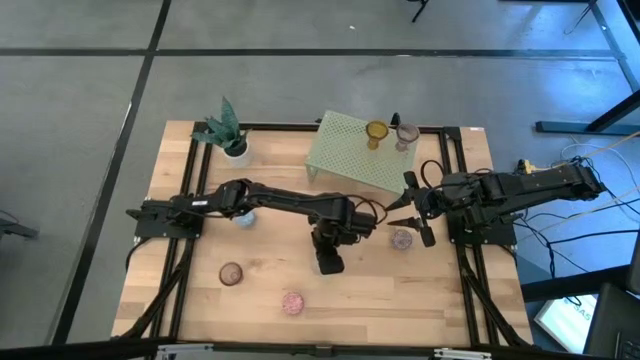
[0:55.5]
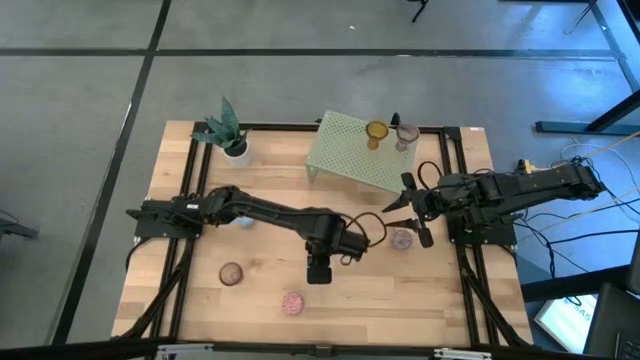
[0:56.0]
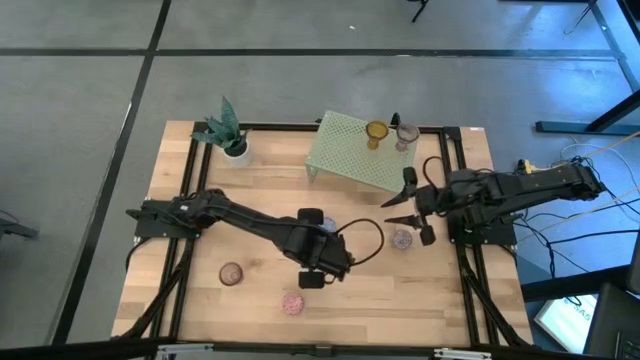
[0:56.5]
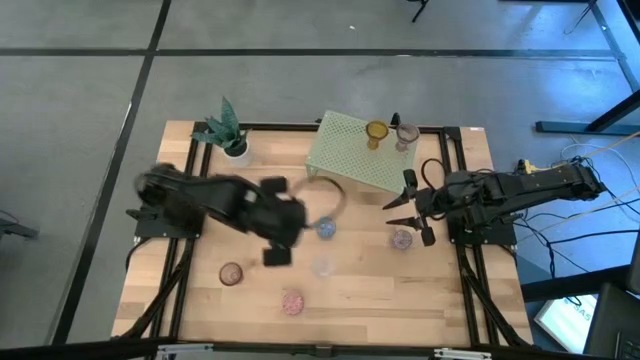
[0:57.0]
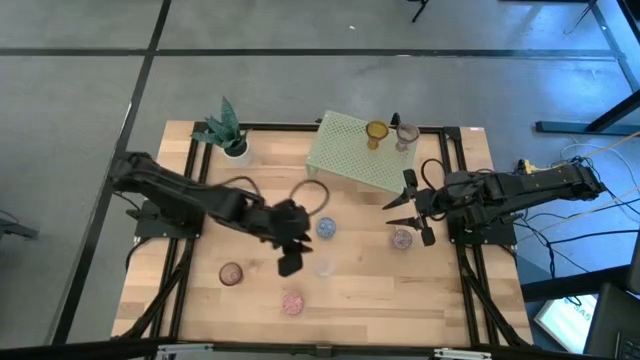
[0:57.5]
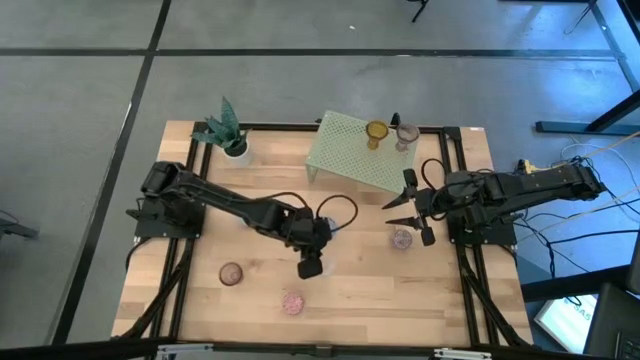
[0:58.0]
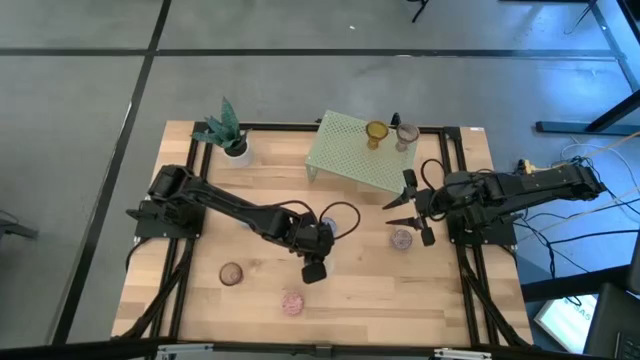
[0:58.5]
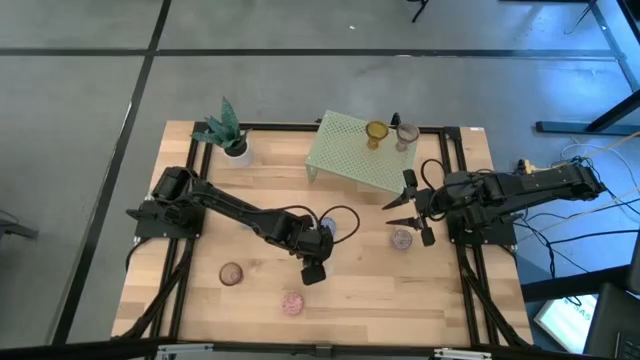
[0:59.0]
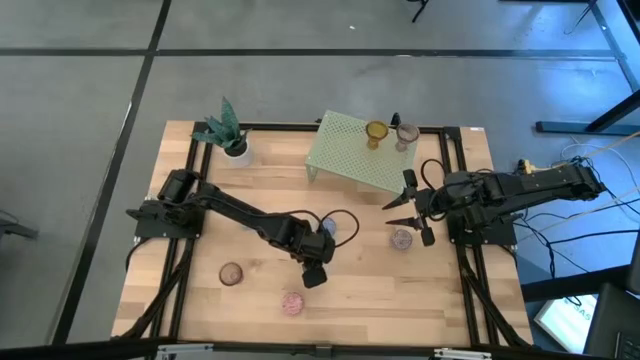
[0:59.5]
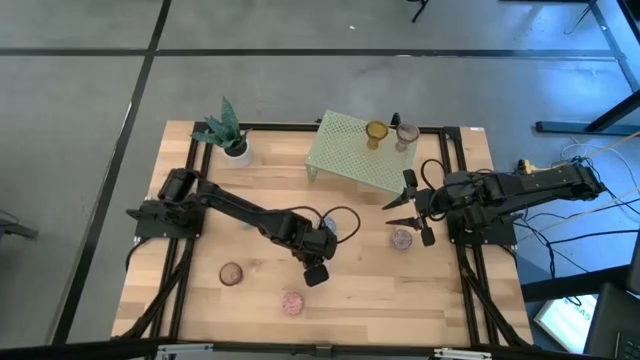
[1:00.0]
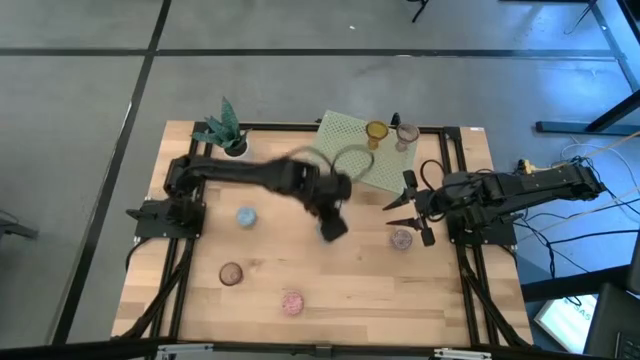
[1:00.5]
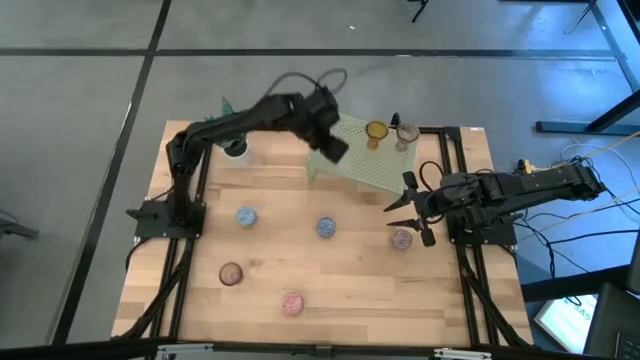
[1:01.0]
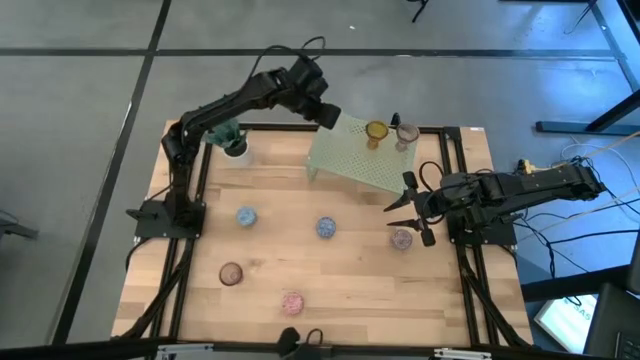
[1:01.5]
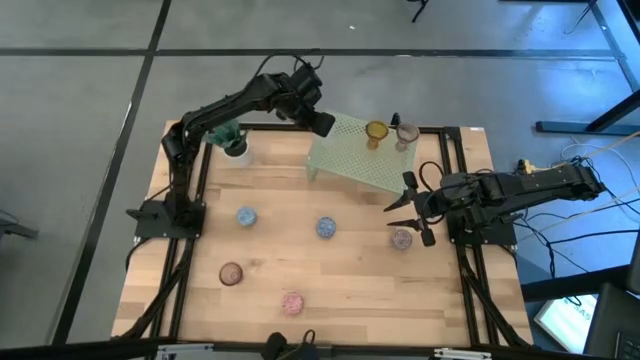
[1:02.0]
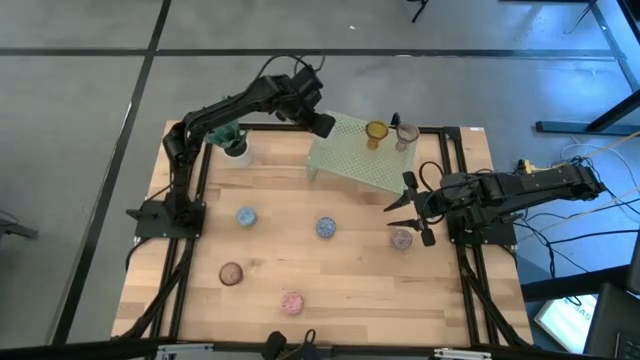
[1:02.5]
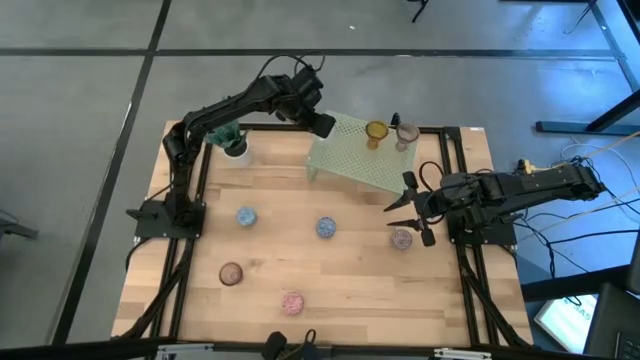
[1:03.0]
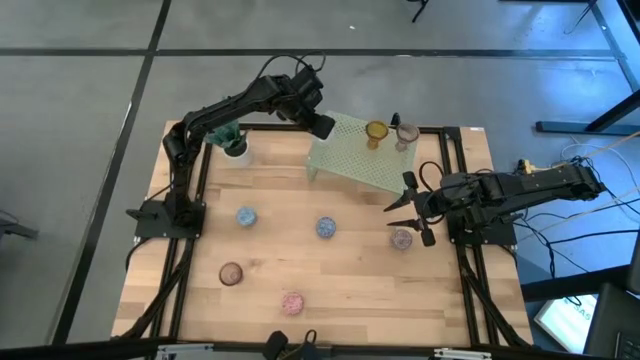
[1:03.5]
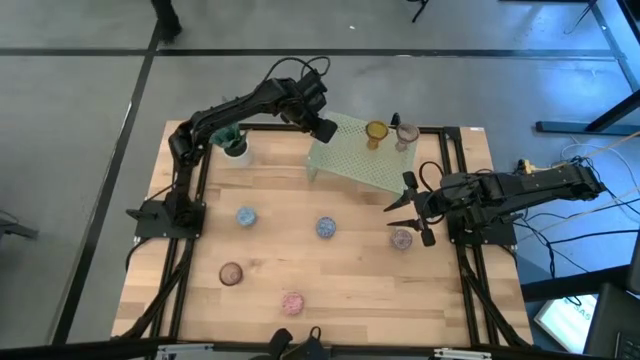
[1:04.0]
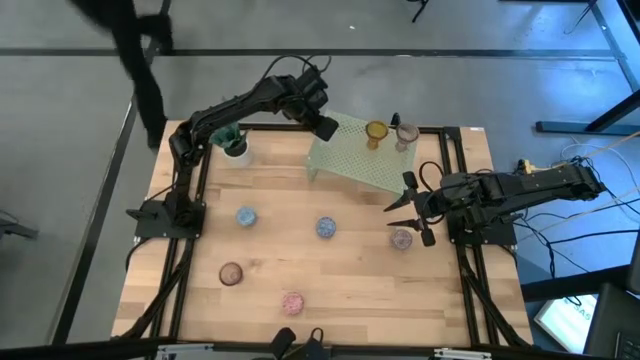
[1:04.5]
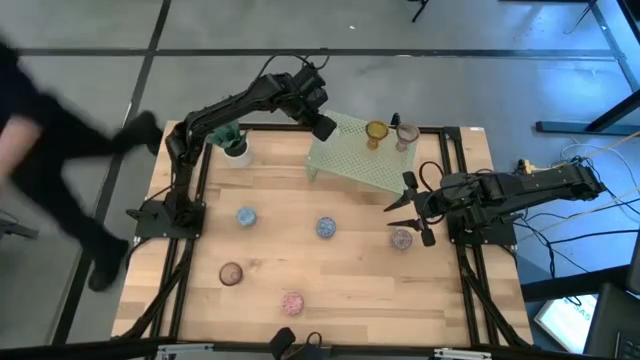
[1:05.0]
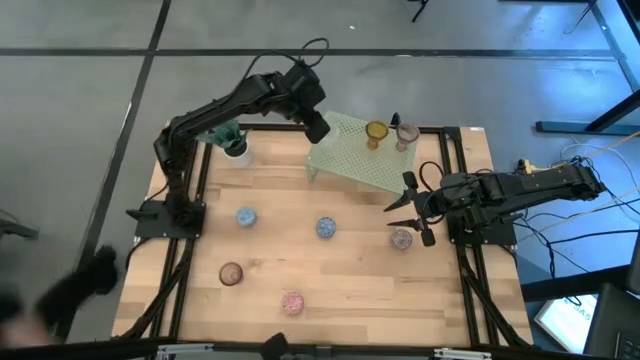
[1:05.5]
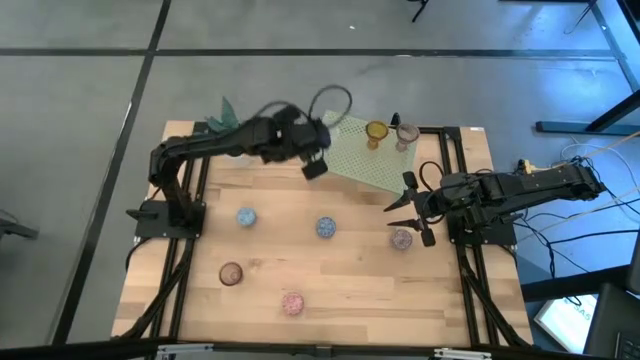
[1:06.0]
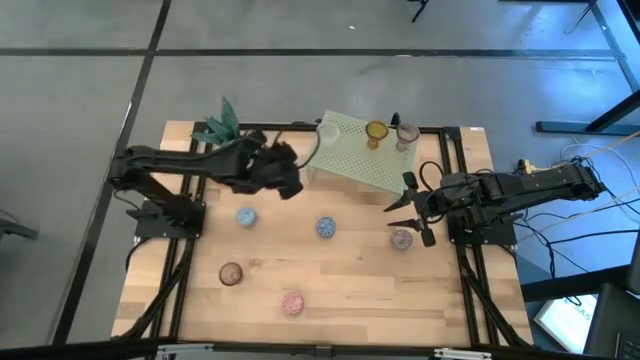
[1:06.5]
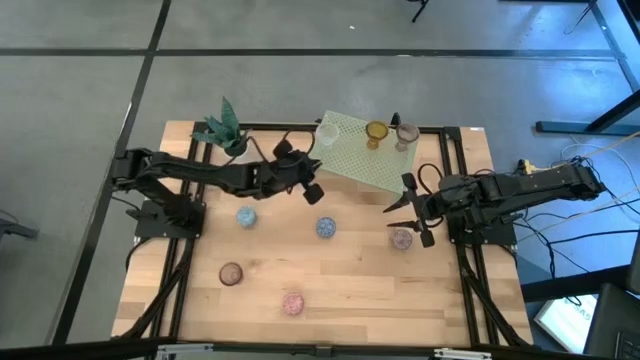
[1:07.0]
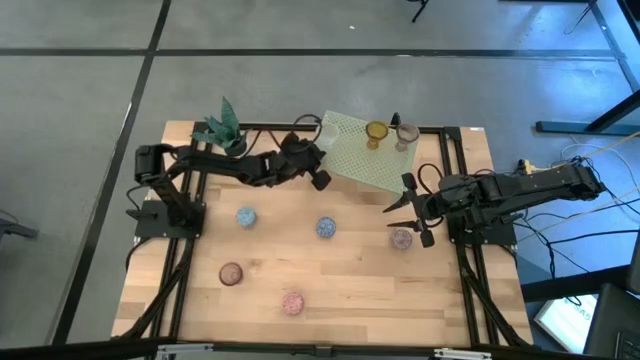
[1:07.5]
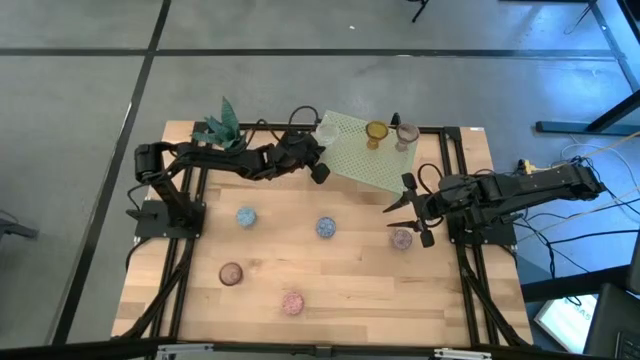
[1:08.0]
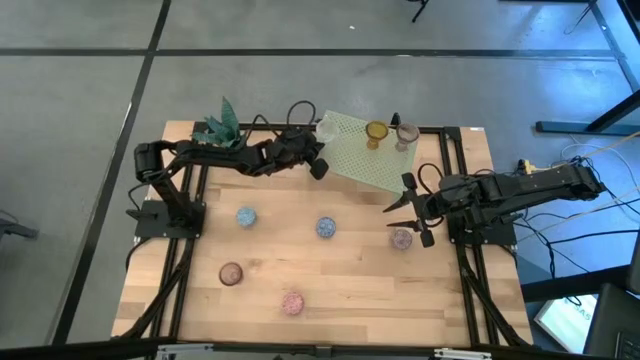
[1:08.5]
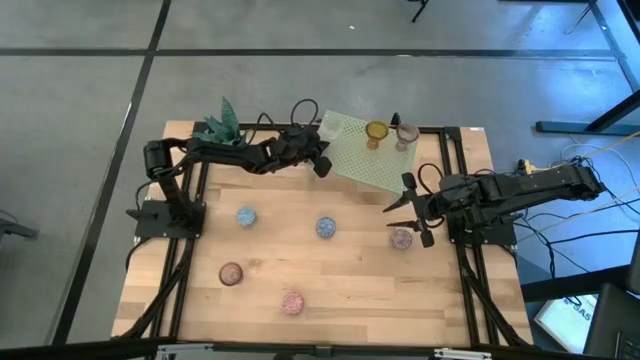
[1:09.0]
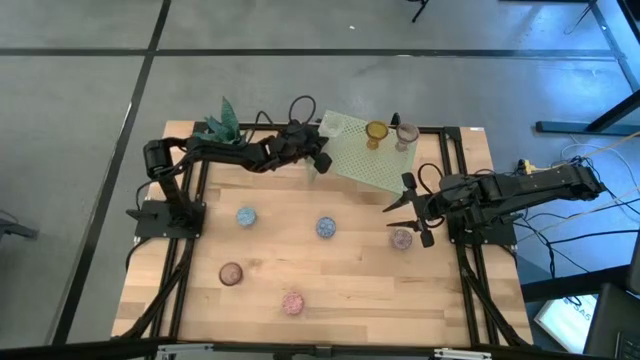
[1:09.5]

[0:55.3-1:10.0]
Task: Pick & Place candle stick holders
Put the transparent candle holder on the shelf aligned with the brown candle holder

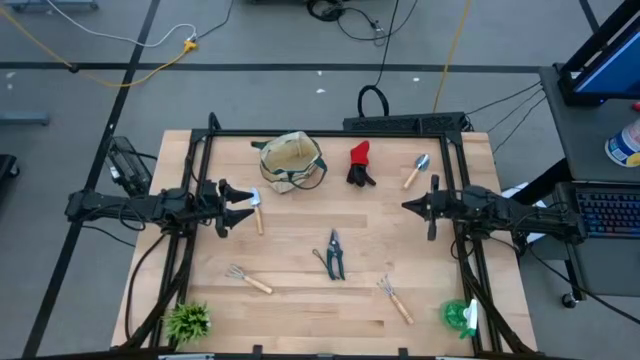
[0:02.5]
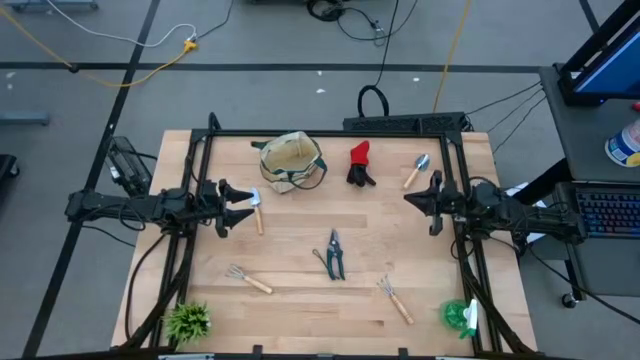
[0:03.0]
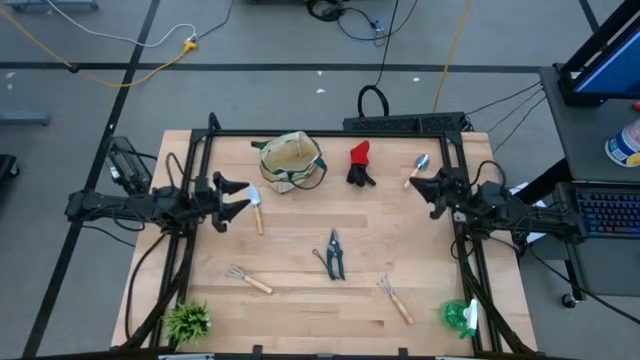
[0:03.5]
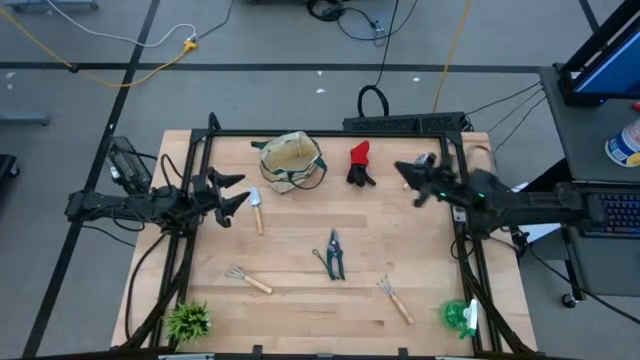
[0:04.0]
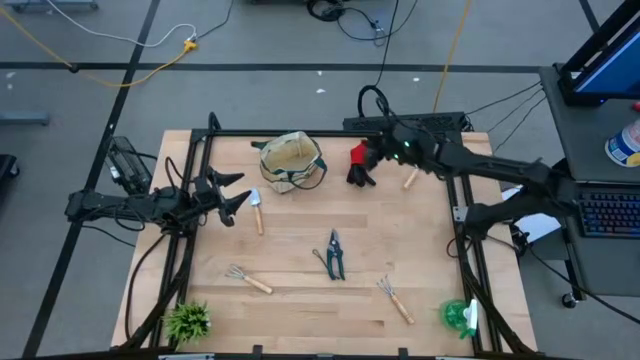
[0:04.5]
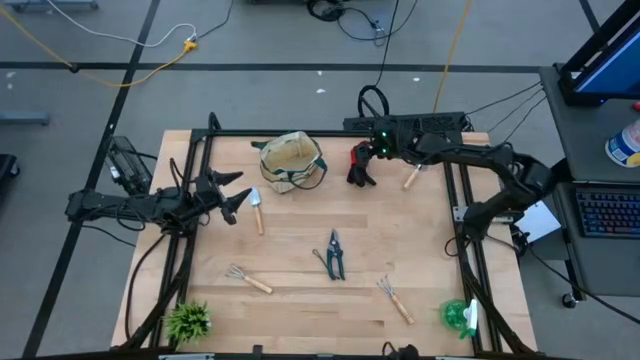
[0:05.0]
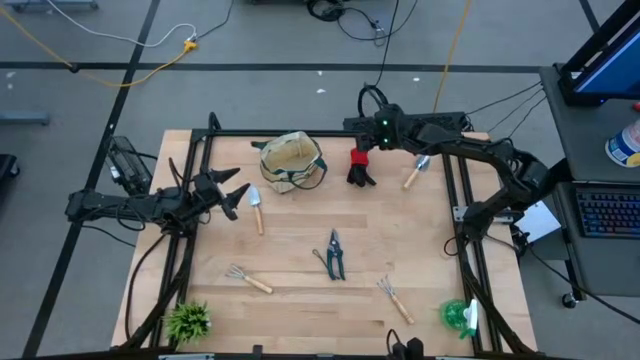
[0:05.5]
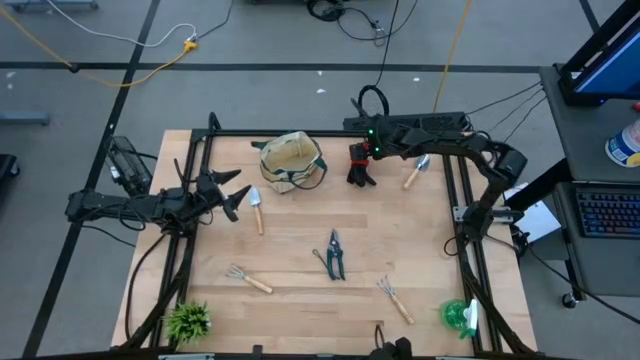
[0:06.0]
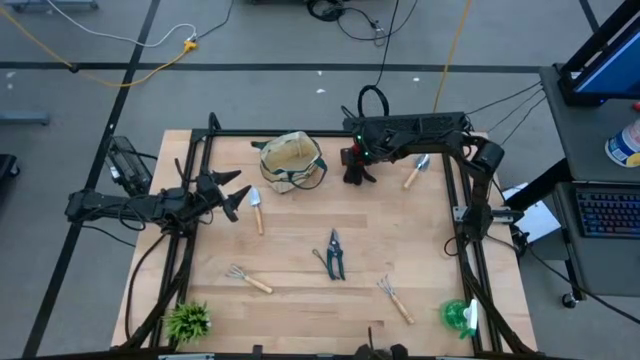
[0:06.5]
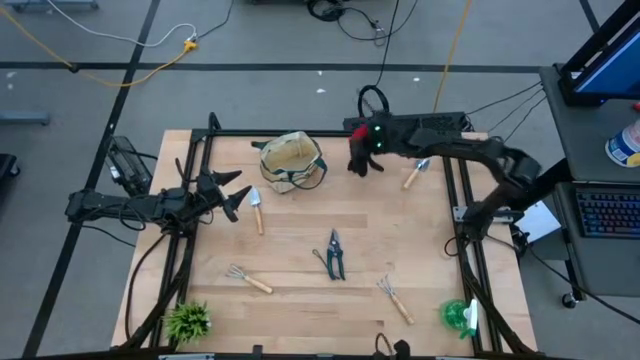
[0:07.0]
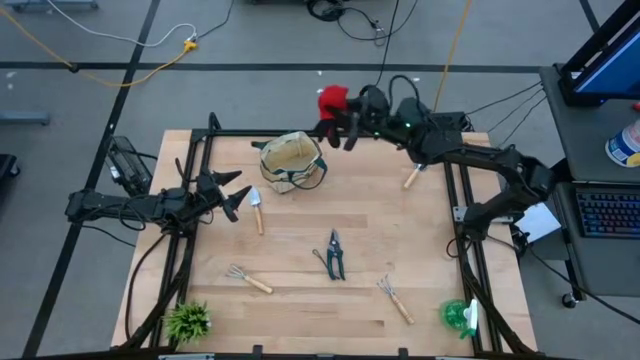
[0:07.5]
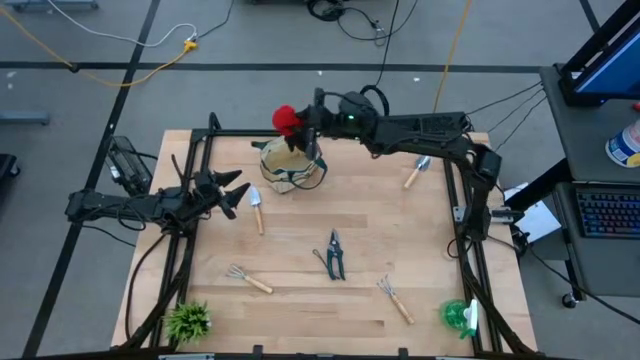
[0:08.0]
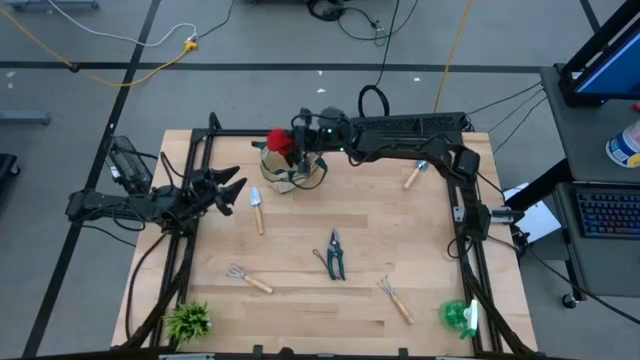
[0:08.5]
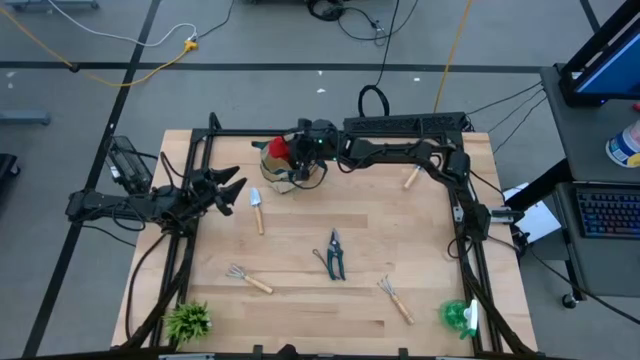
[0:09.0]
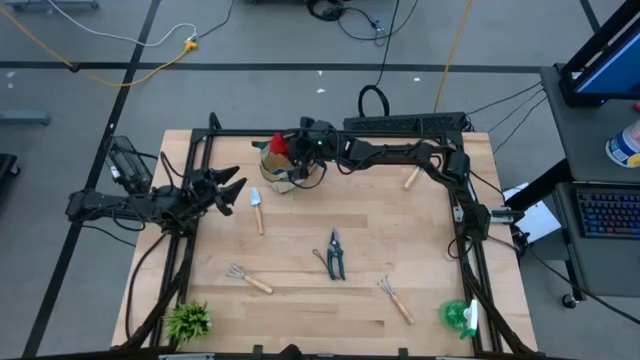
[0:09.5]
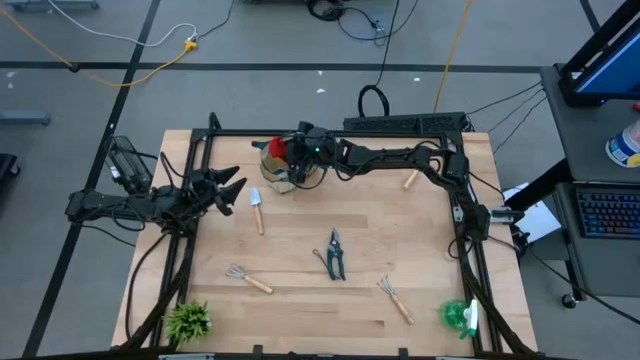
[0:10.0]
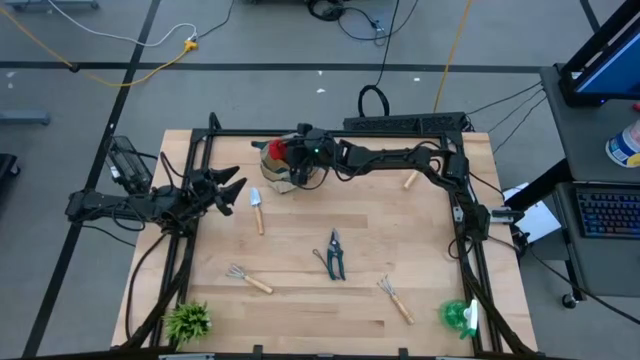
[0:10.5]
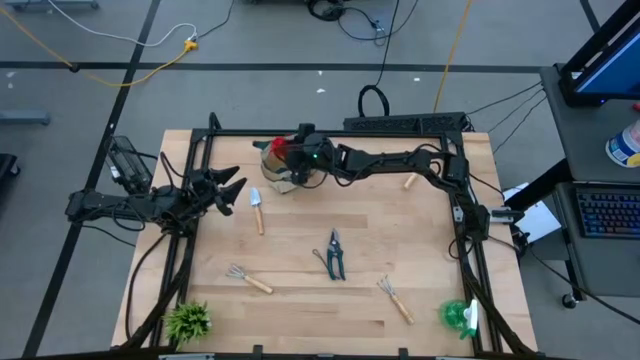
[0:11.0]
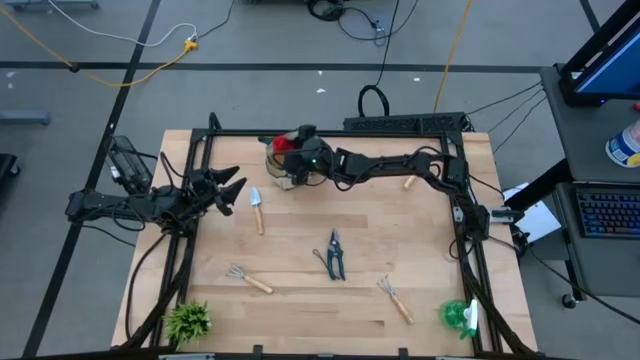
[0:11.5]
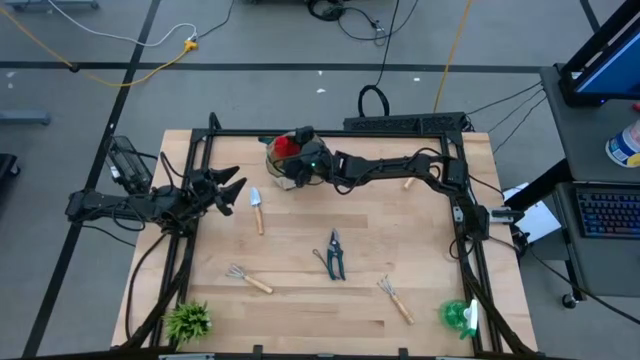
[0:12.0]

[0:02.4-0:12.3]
Task: Pick & Place Garden tools in Gardening bag
Put the gloves into the gardening bag
